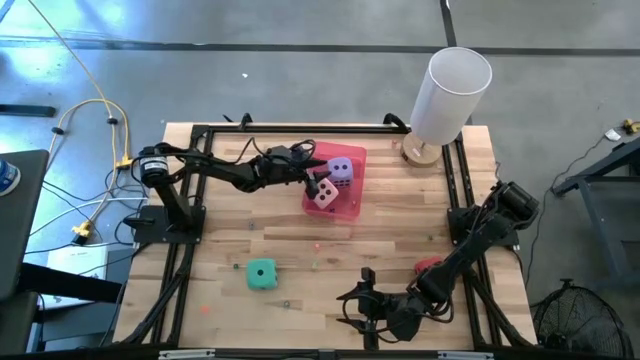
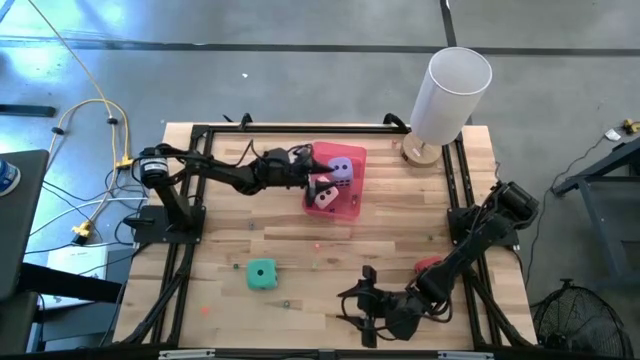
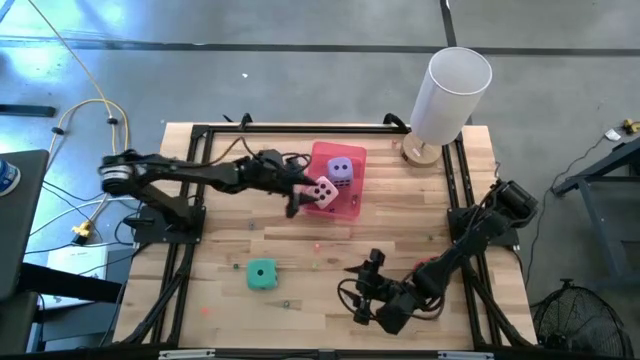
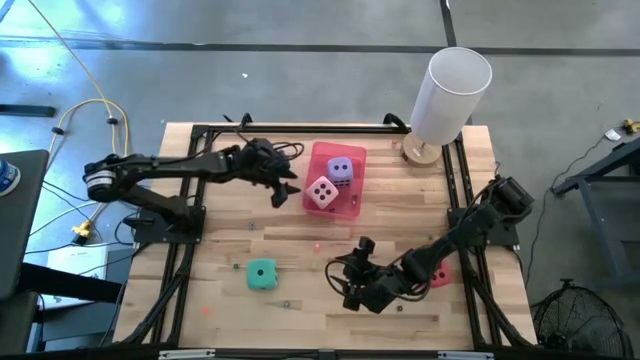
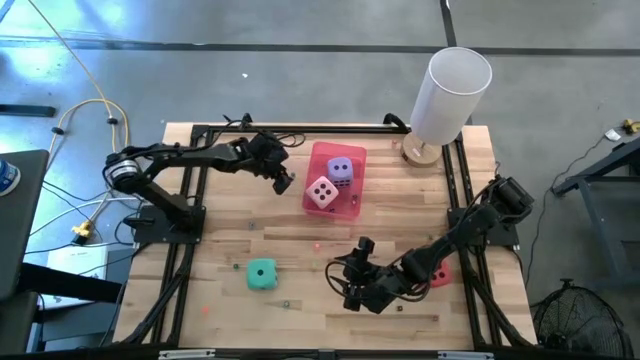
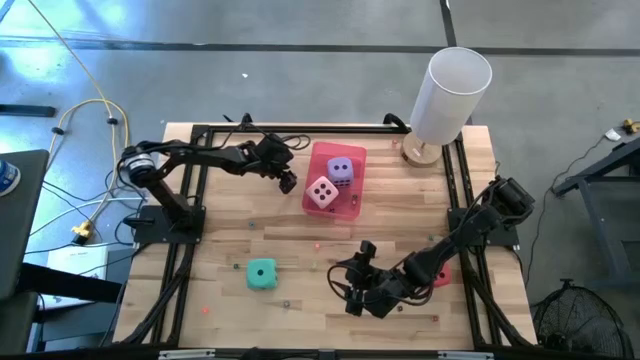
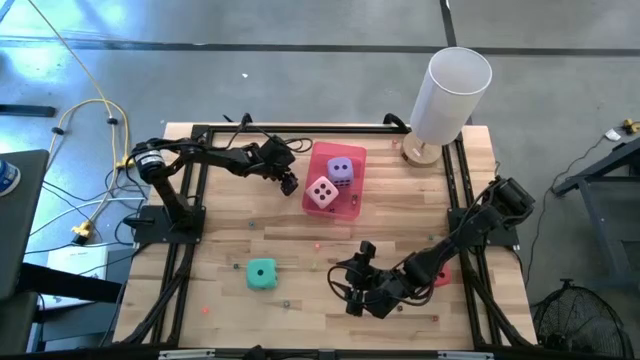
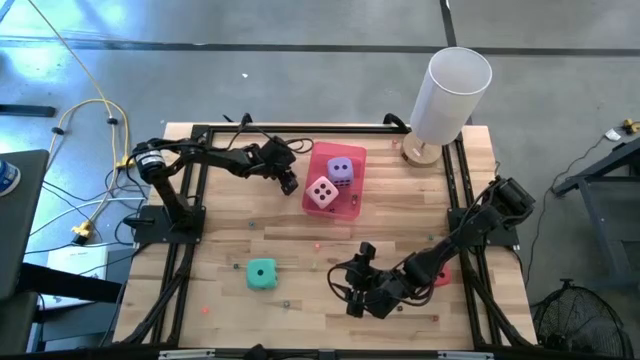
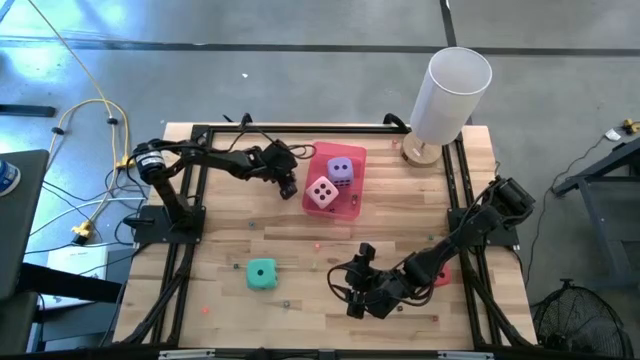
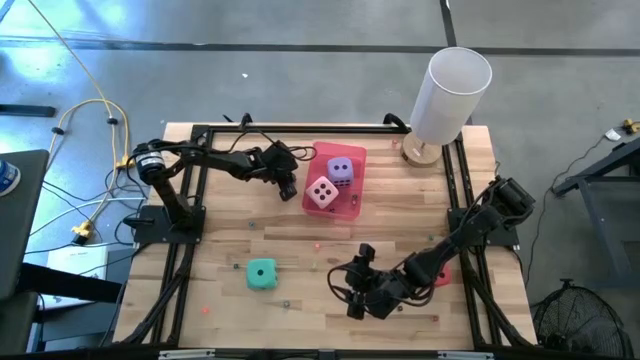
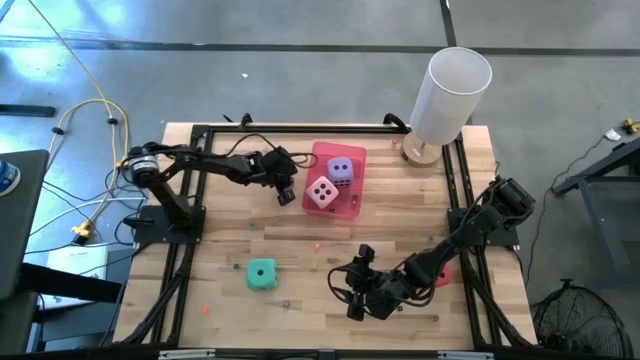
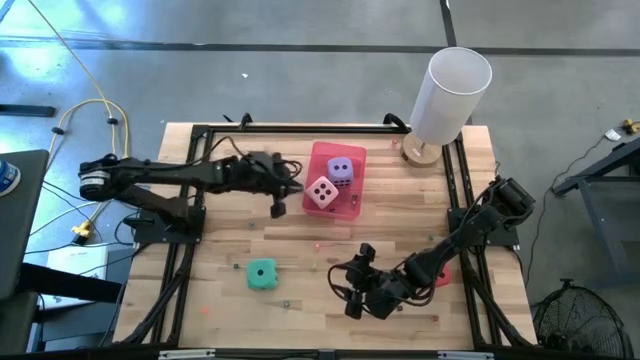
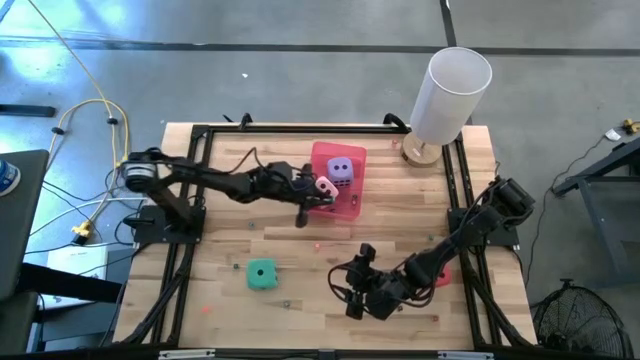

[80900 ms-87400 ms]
Task: Pick & Place Dice
Put the small light blue die into the red bin

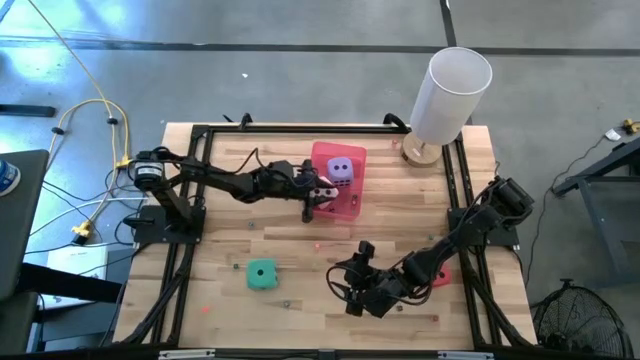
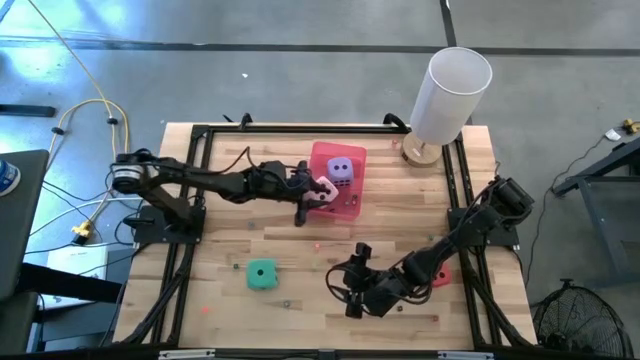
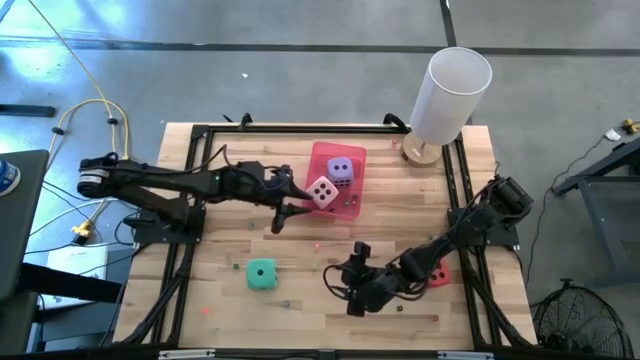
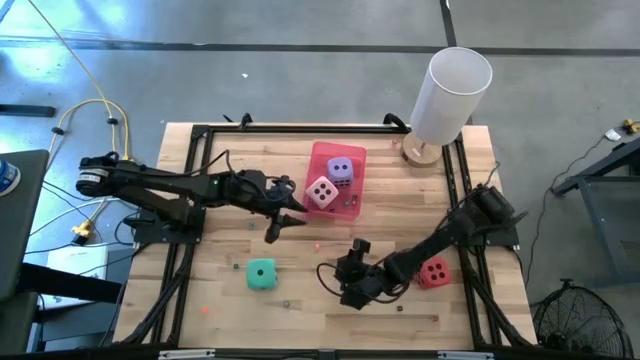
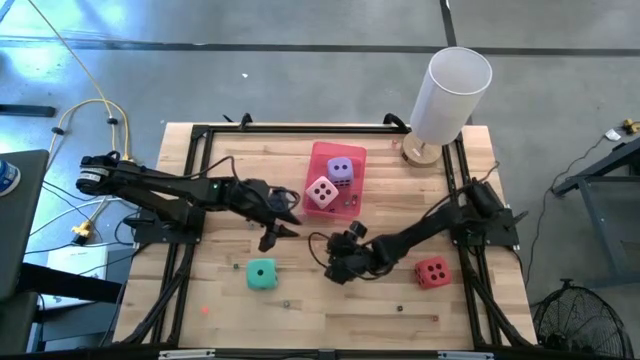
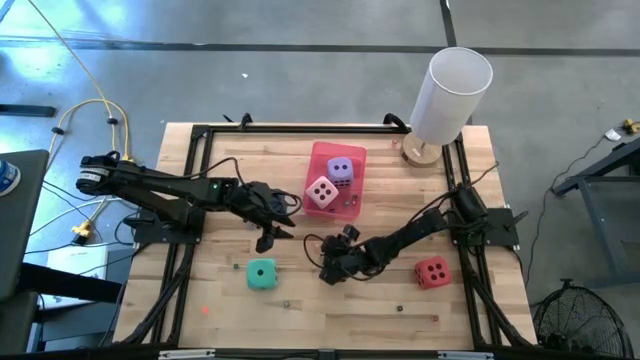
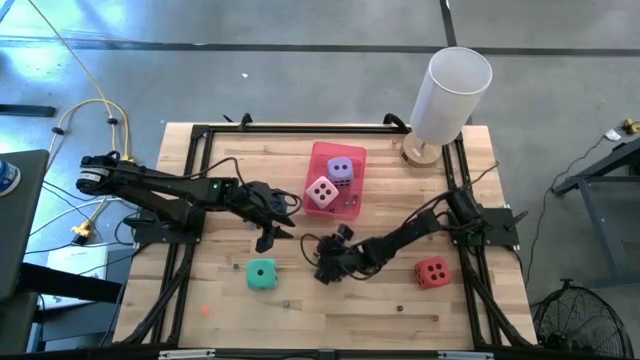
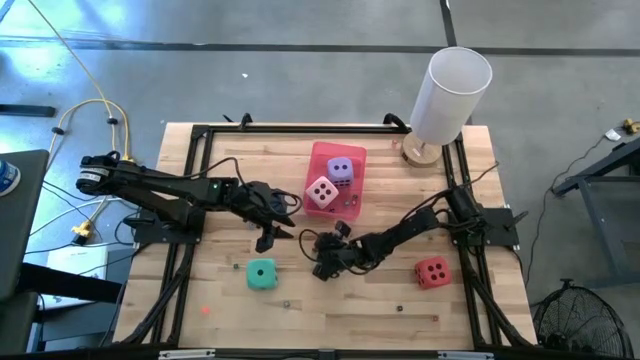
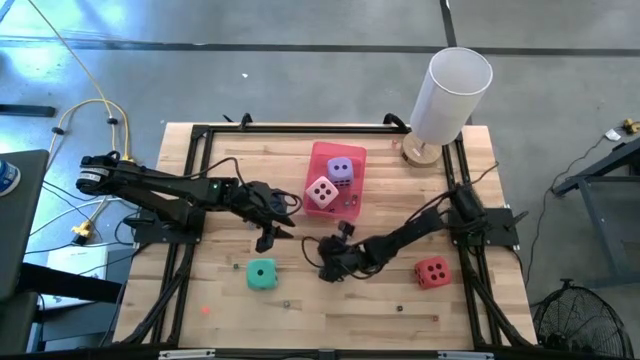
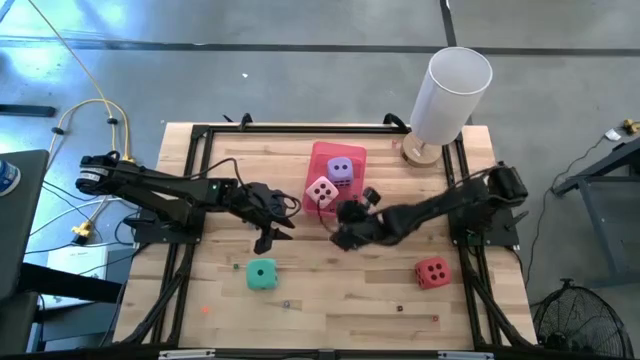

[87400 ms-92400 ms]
Put the small orange die into the red bin

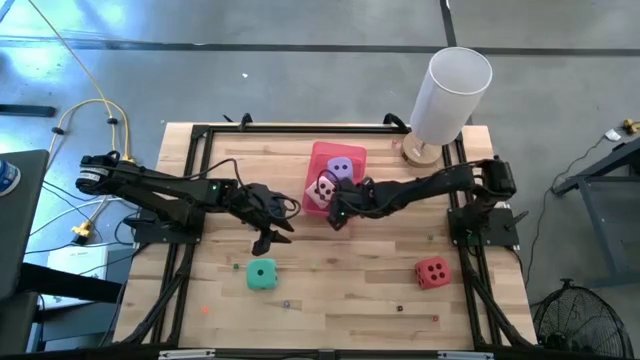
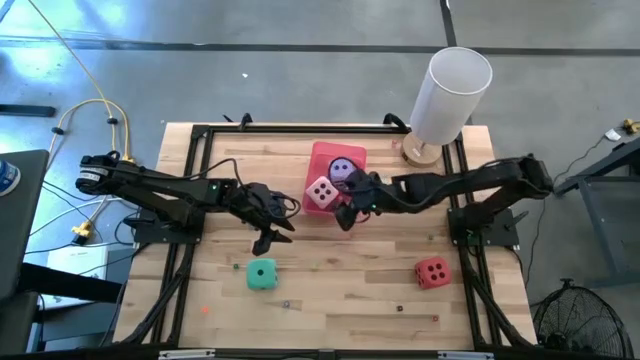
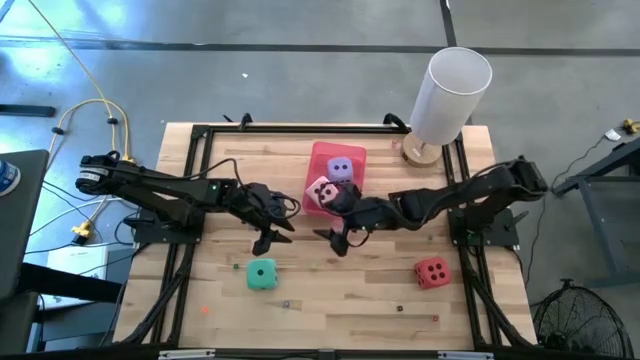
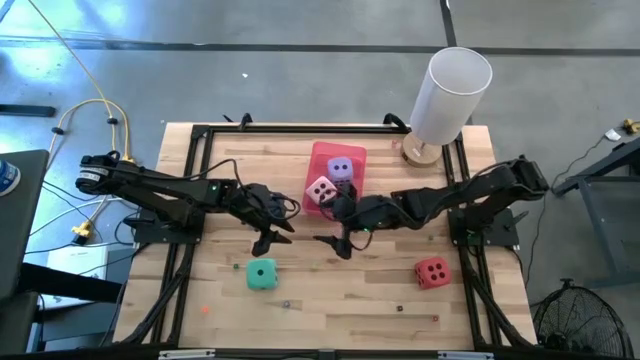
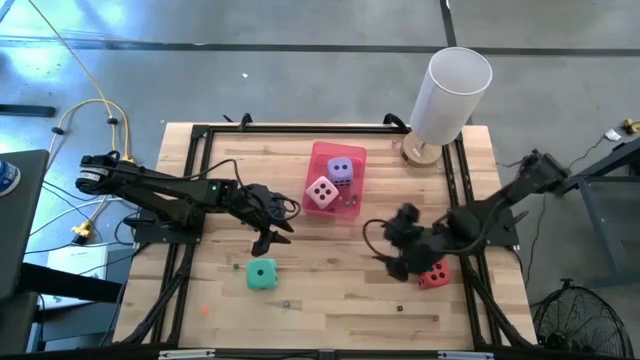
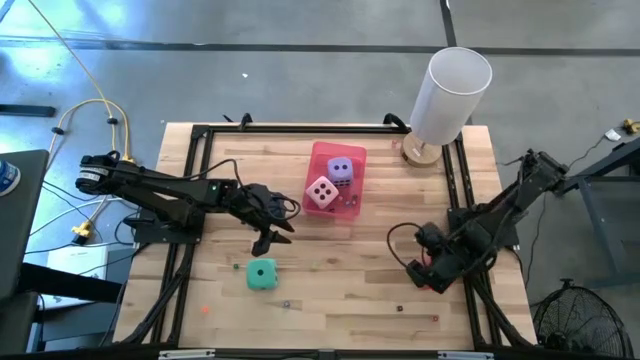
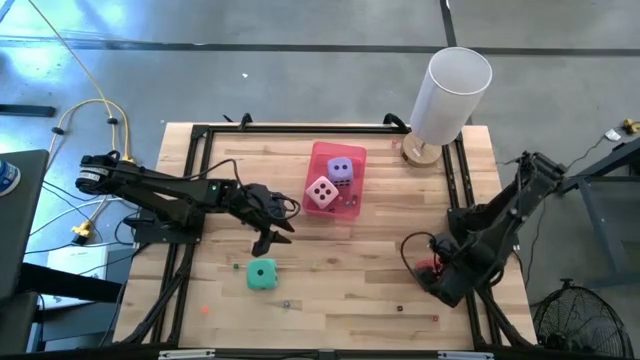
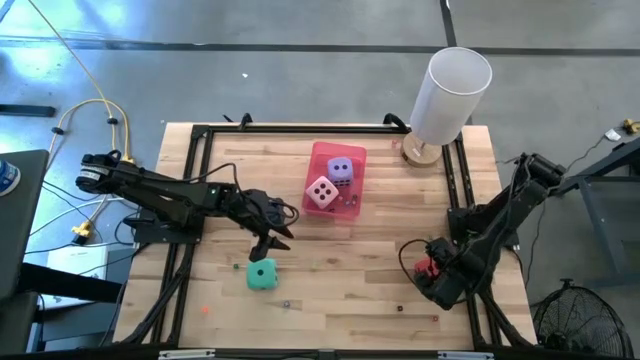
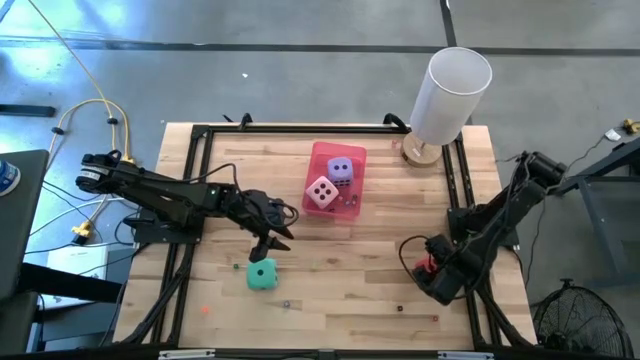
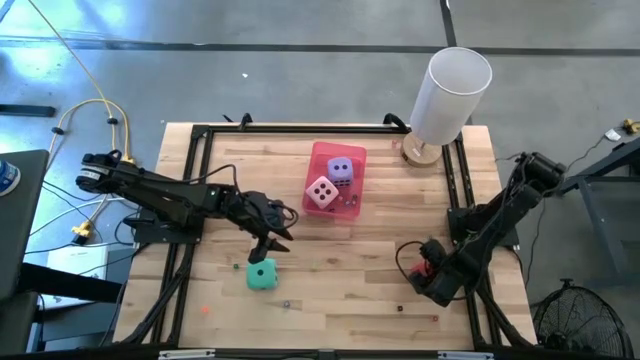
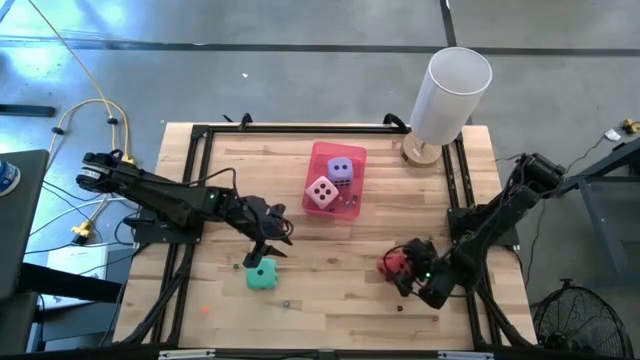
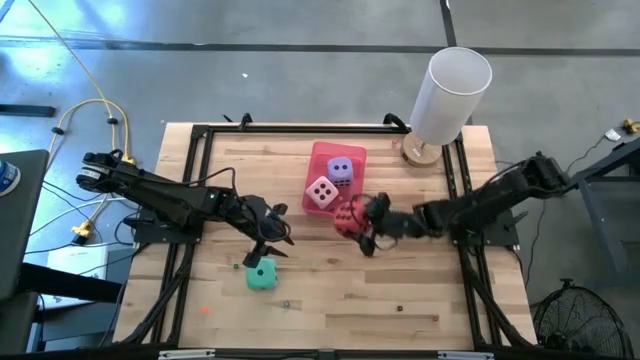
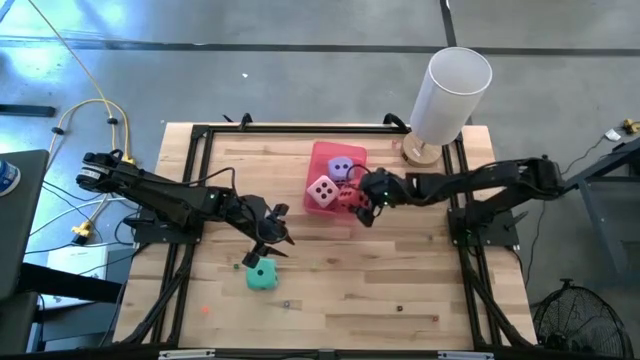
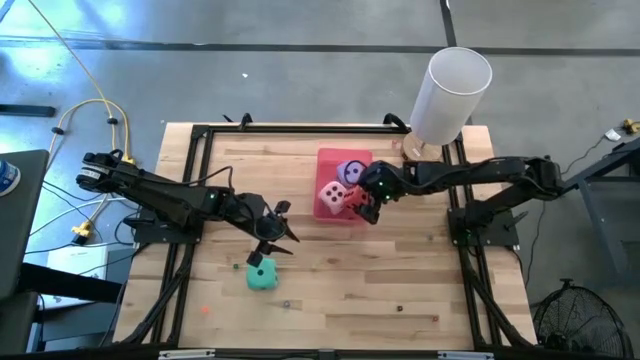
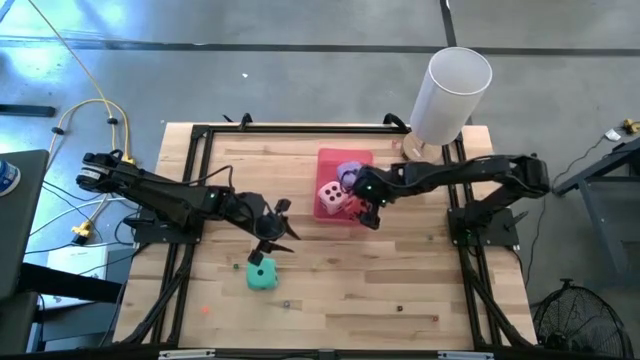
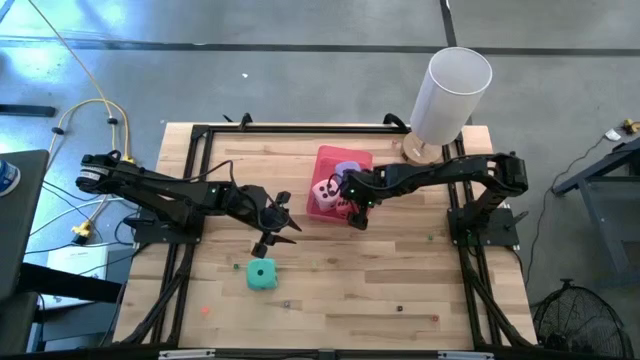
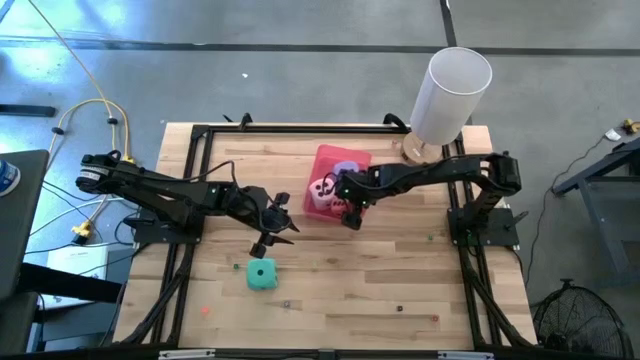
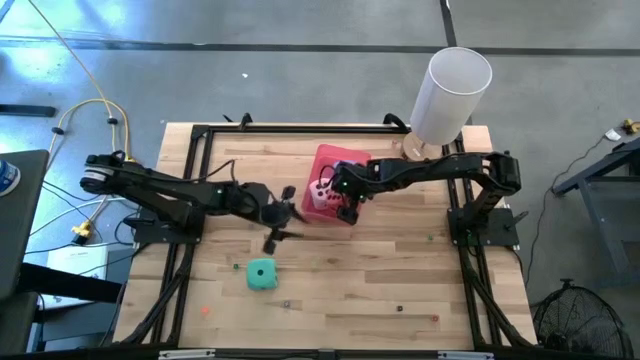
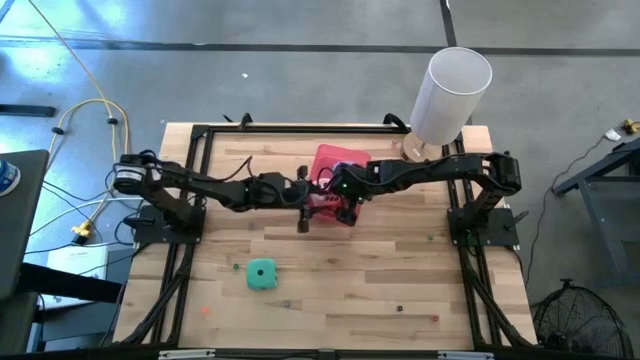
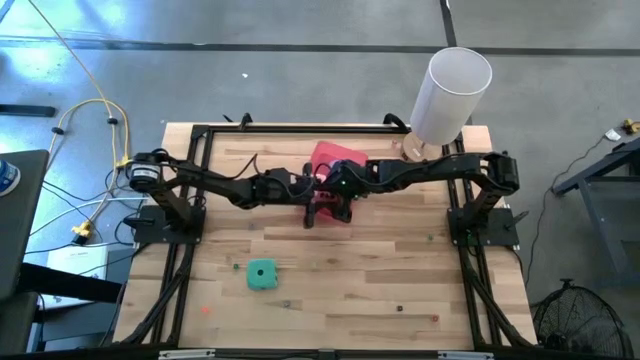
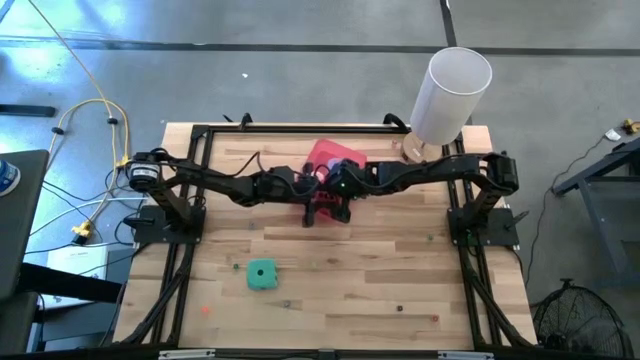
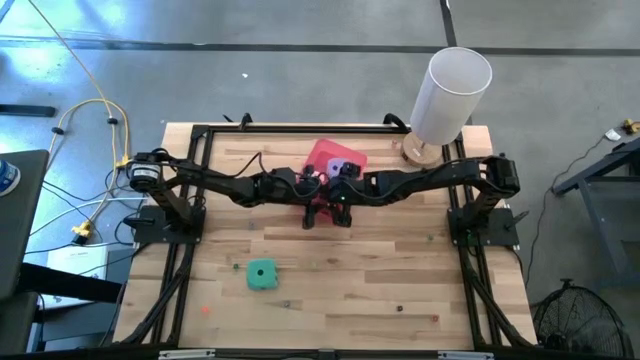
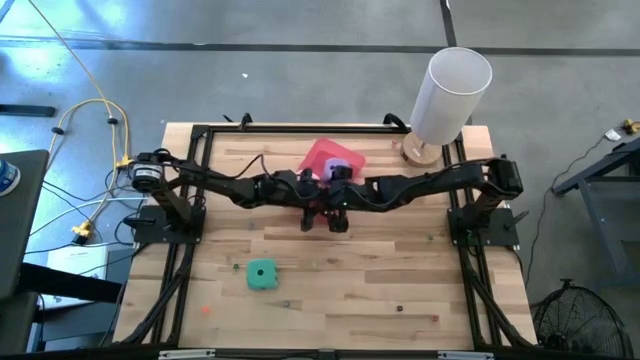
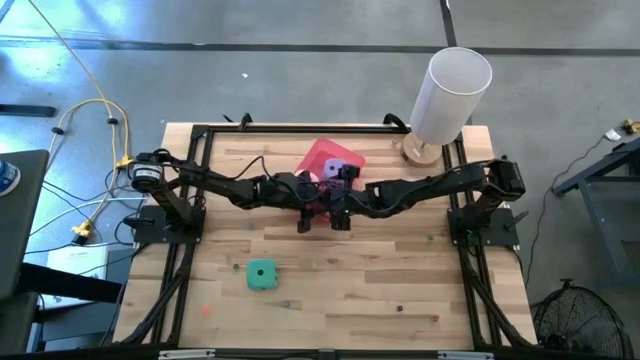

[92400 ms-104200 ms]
Put the large red die into the red bin
